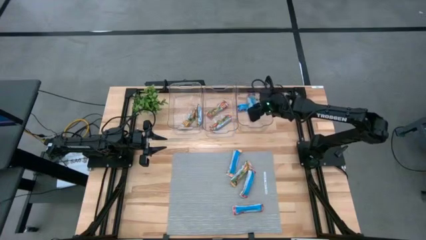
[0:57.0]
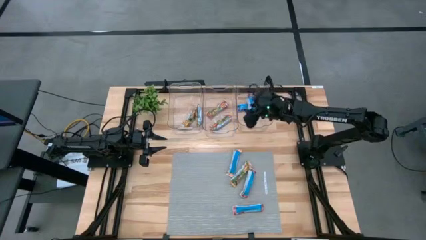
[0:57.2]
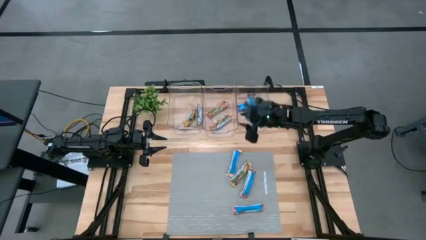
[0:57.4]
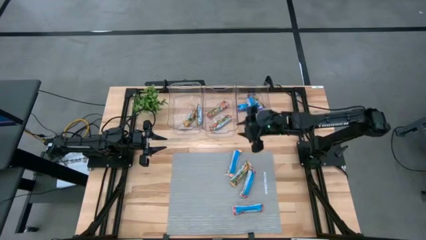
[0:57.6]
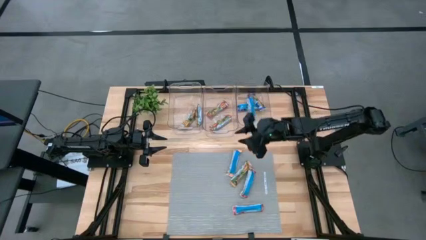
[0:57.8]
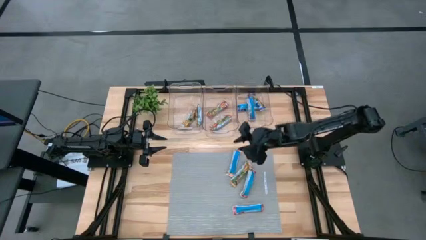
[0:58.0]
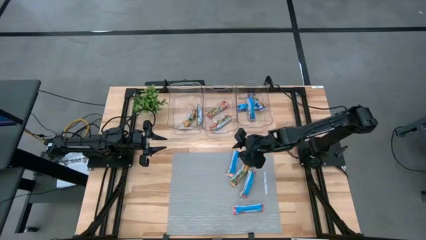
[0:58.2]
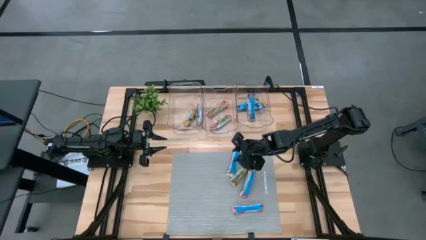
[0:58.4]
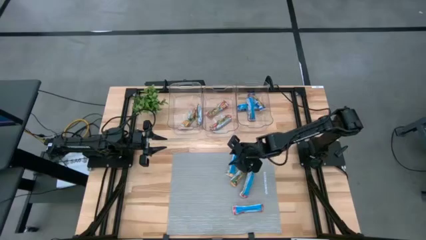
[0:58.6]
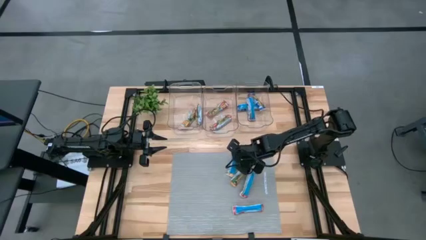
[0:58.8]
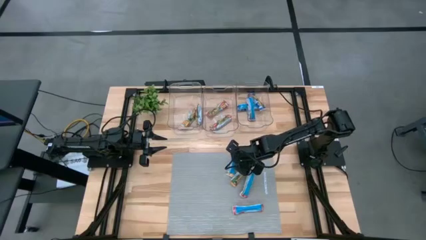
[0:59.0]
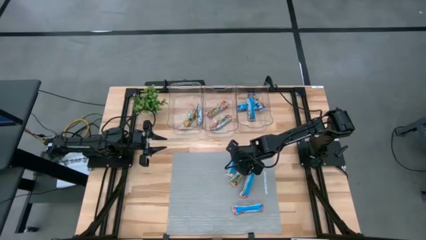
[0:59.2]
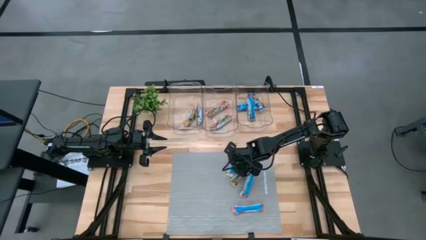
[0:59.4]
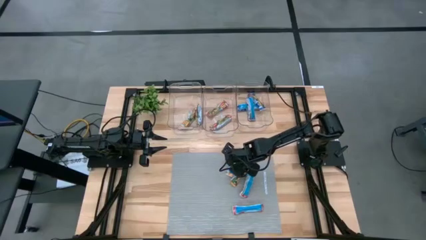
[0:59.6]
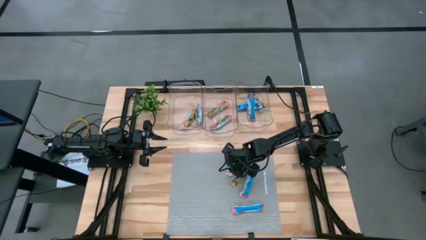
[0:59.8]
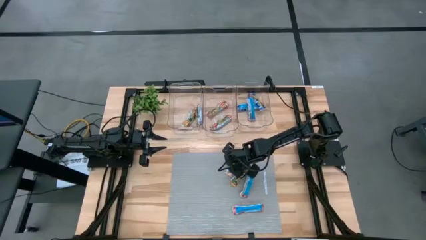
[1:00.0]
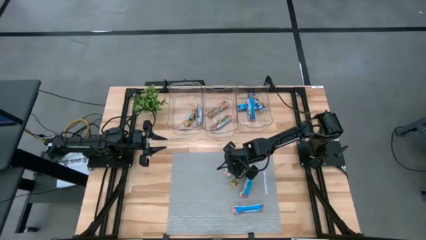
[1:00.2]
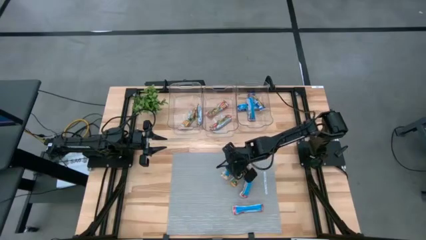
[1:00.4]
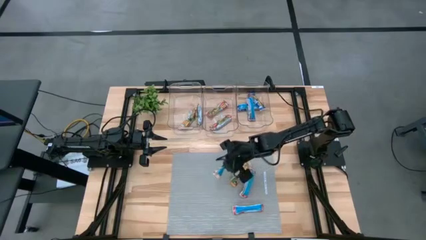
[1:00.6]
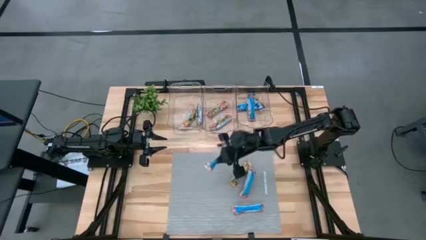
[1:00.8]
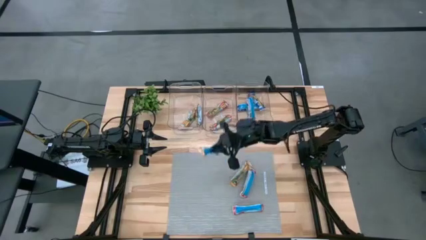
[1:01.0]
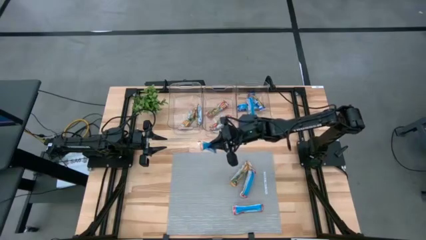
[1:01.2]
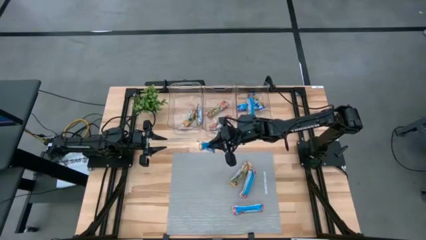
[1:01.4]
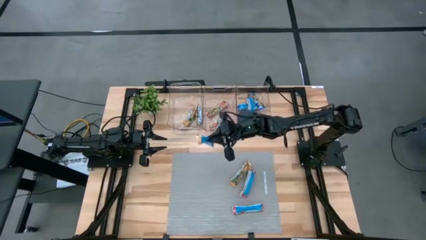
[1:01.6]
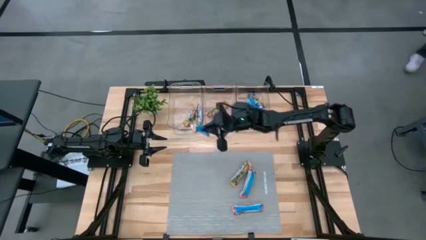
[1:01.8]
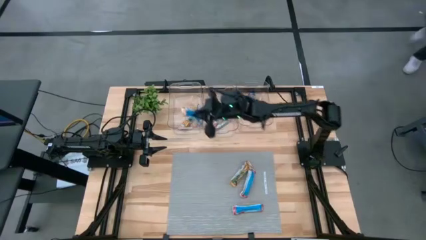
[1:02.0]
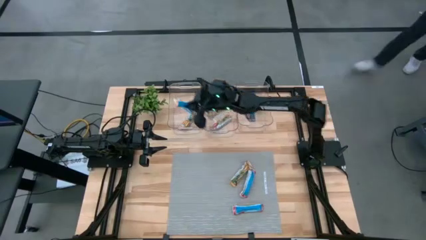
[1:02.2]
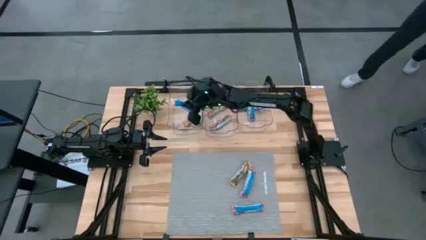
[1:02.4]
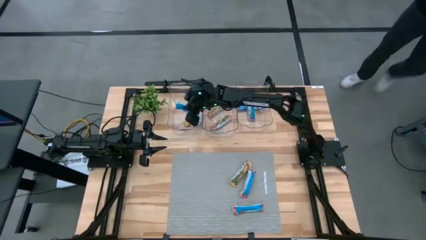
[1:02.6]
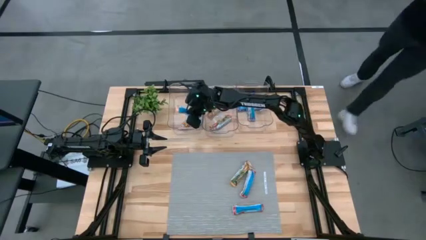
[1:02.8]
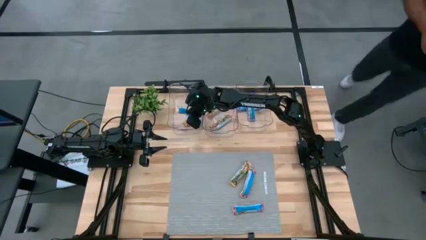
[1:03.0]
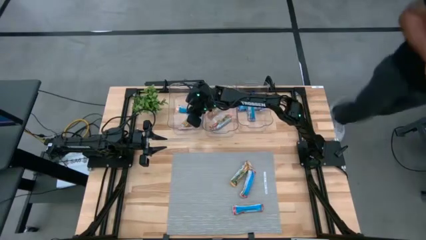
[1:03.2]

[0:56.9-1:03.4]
Task: Pick and place Granola Bars by type
Put the orange granola bar into the left transparent bin

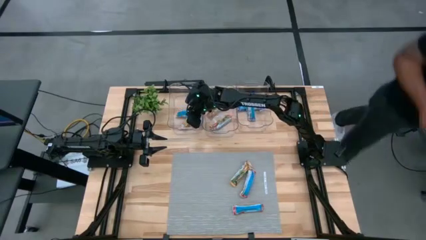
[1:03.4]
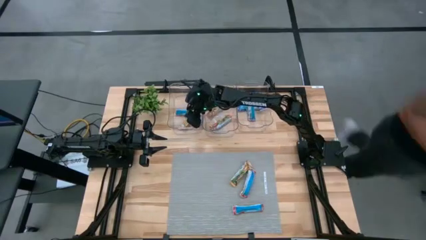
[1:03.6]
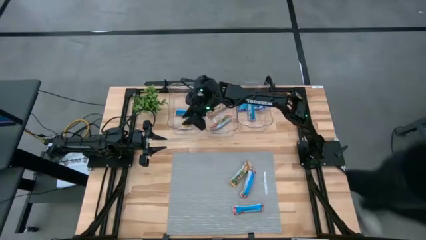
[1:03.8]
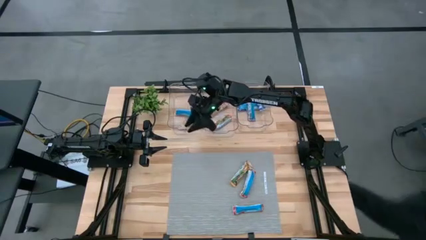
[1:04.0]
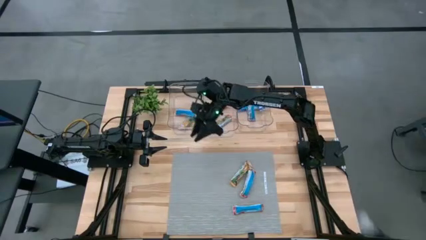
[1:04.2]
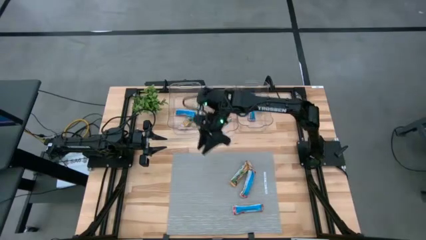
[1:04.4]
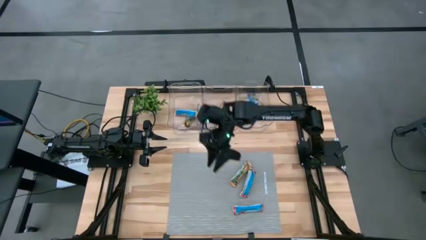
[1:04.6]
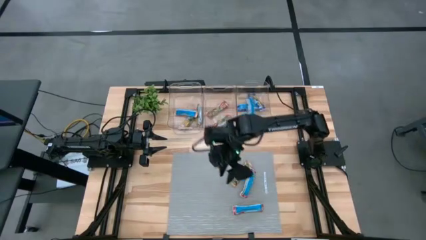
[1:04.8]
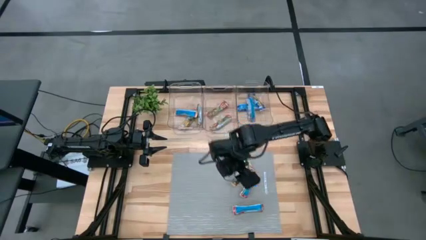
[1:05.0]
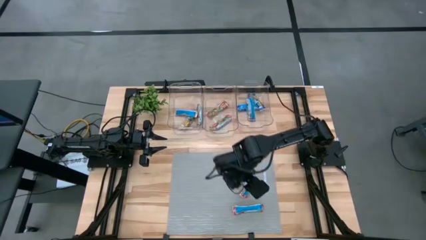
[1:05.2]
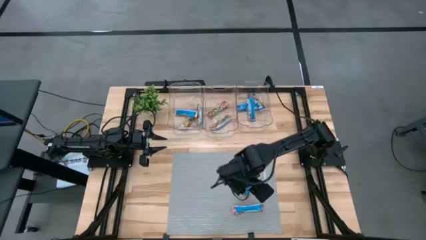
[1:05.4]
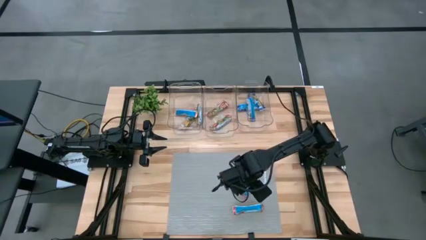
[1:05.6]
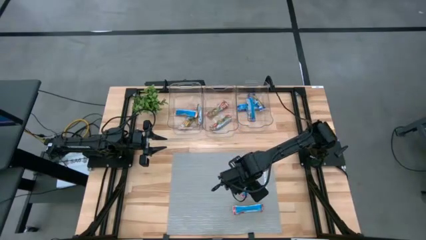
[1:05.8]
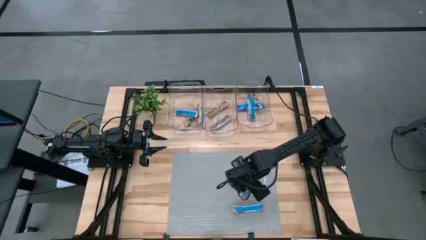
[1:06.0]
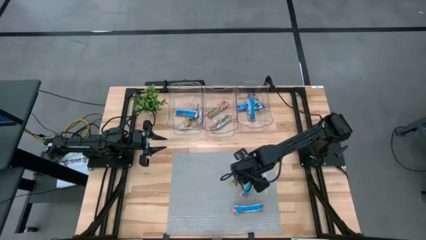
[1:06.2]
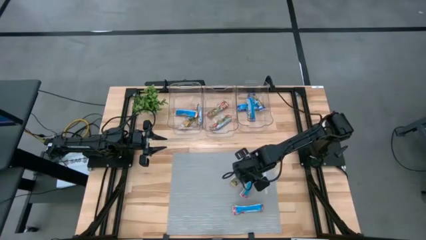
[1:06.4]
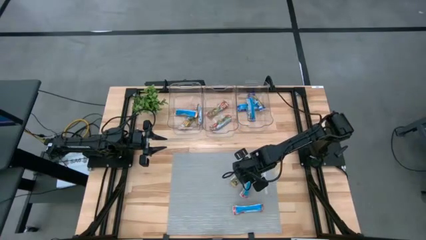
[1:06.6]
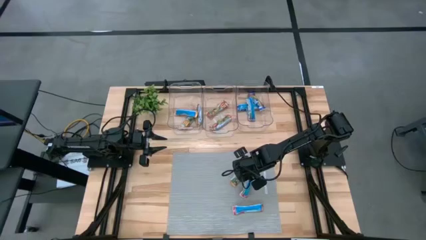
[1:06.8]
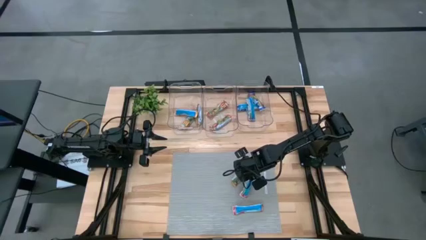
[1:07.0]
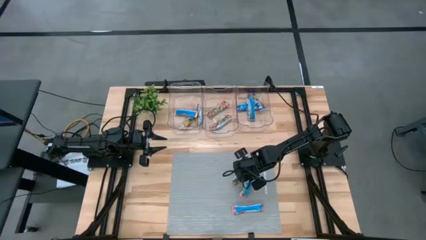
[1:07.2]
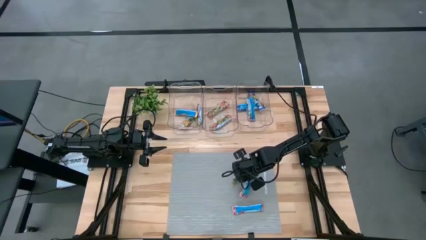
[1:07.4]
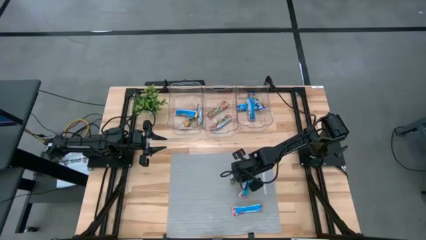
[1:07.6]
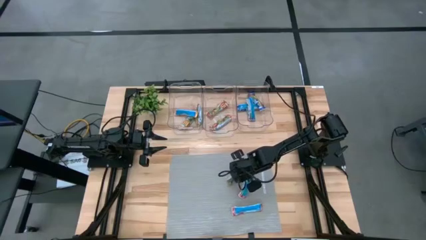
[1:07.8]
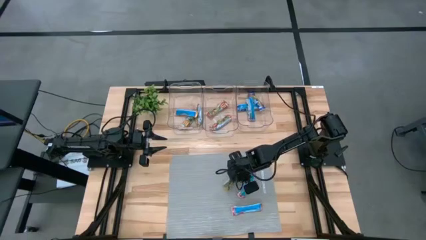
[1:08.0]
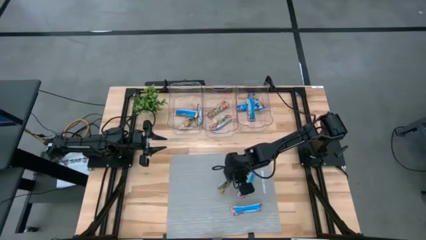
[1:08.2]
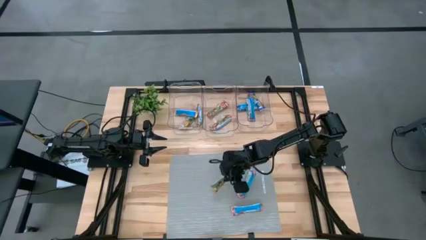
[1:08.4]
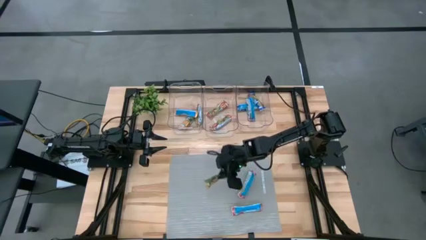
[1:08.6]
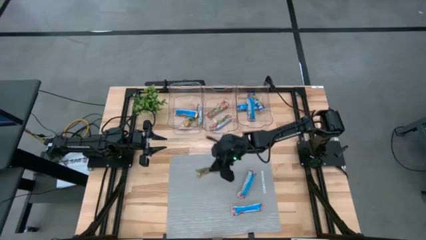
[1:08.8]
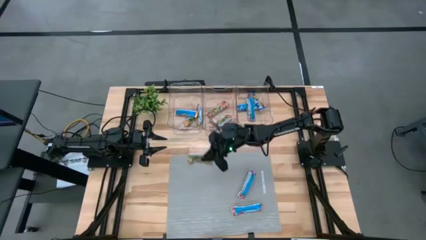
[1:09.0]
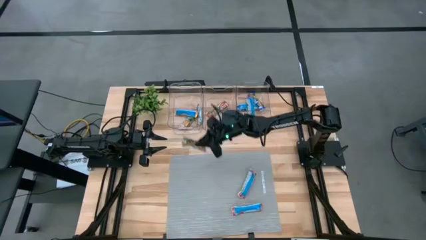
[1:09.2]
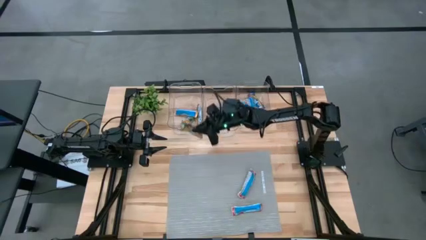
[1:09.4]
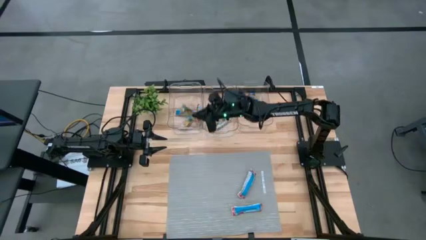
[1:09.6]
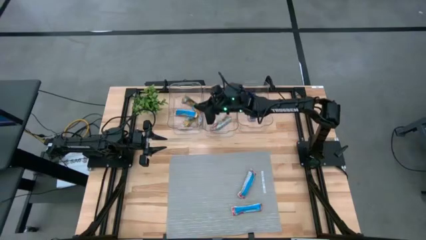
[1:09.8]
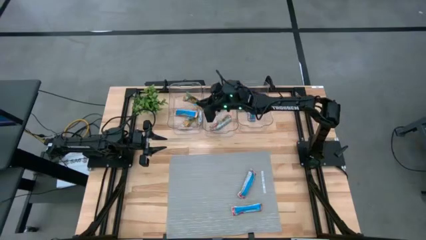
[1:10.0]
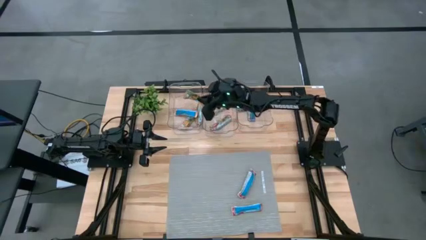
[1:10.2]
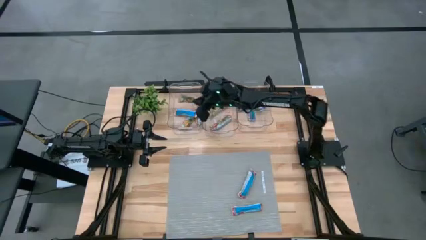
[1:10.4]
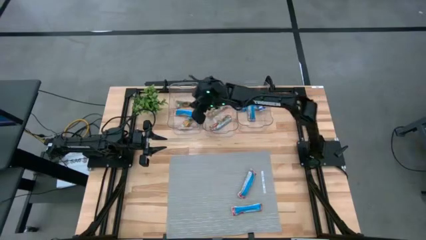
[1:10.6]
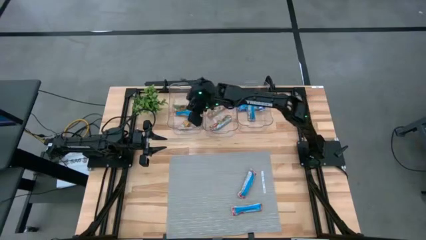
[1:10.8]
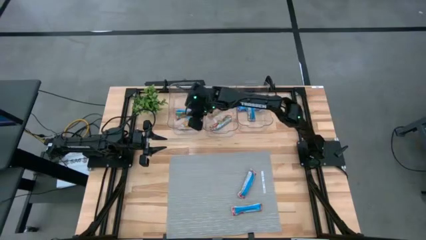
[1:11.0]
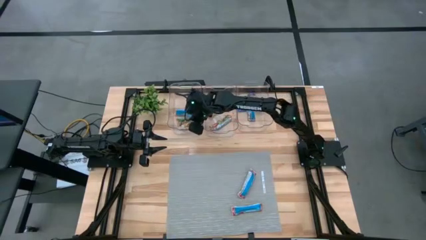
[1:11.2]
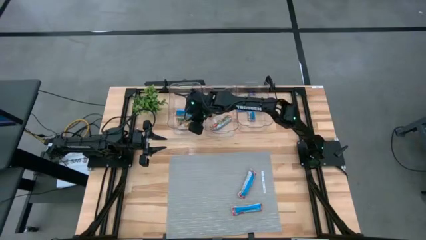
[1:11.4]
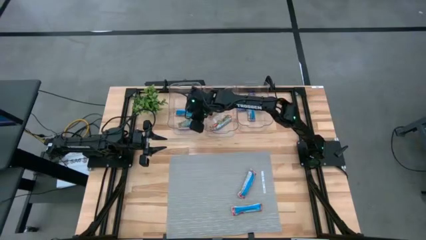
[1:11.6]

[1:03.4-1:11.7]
Put the orange granola bar into the left transparent bin
